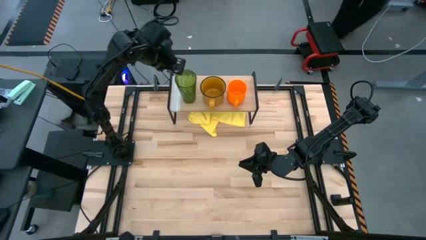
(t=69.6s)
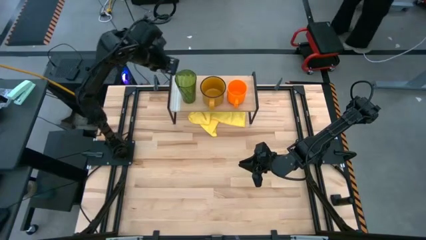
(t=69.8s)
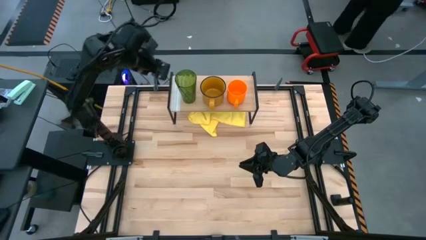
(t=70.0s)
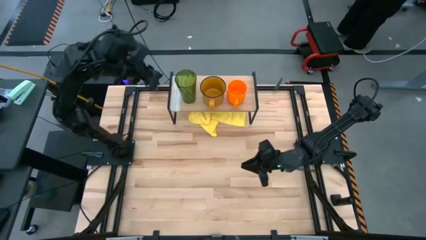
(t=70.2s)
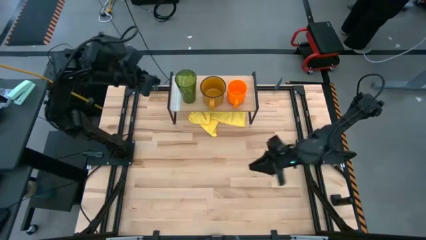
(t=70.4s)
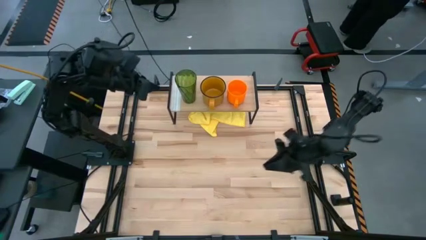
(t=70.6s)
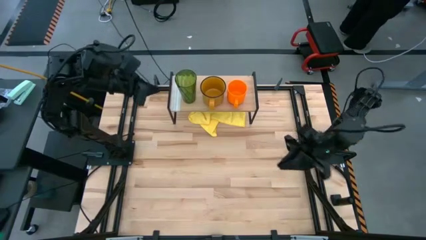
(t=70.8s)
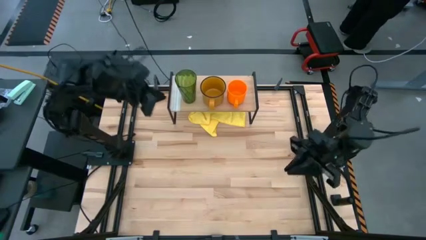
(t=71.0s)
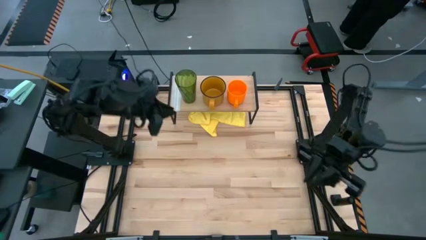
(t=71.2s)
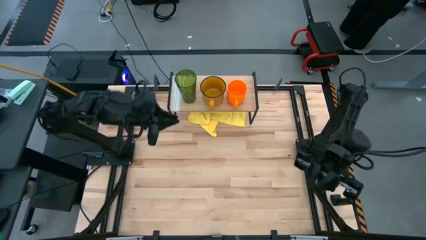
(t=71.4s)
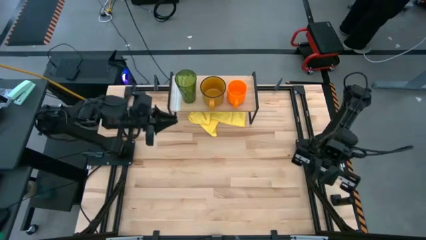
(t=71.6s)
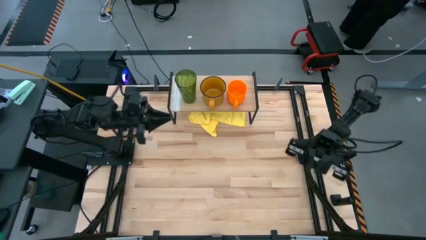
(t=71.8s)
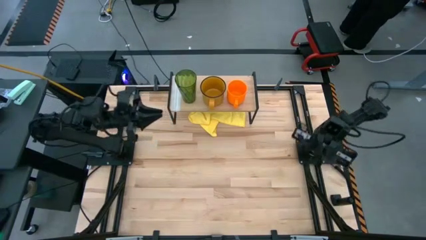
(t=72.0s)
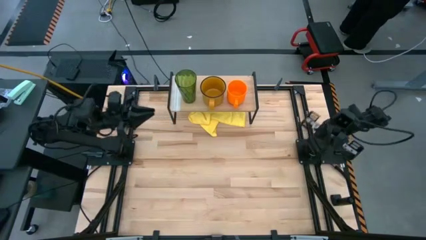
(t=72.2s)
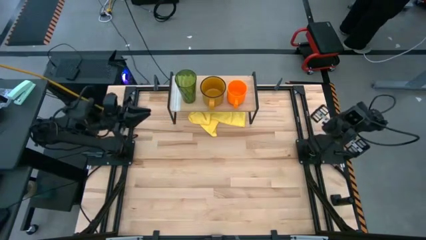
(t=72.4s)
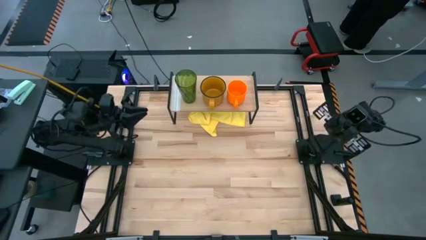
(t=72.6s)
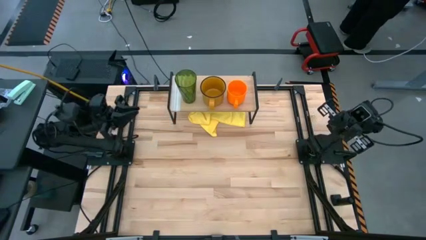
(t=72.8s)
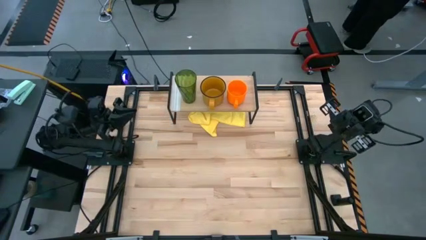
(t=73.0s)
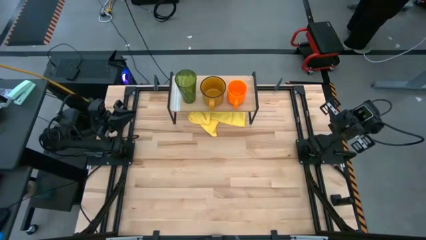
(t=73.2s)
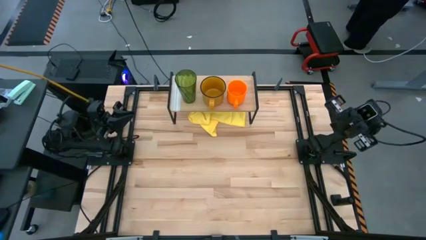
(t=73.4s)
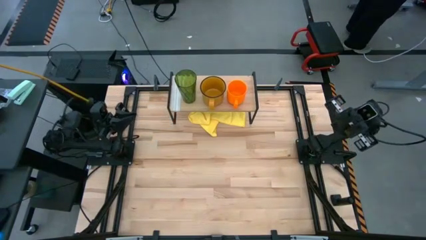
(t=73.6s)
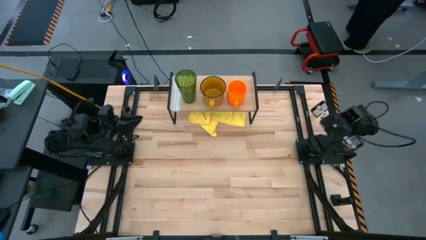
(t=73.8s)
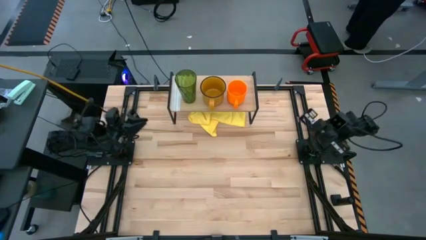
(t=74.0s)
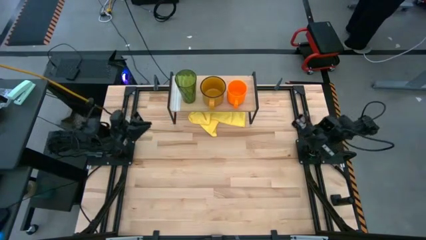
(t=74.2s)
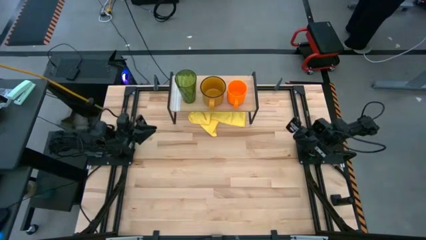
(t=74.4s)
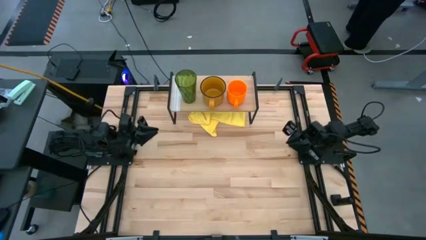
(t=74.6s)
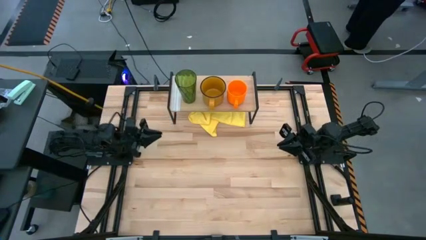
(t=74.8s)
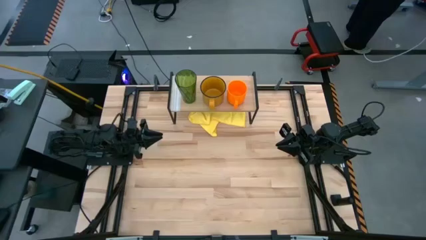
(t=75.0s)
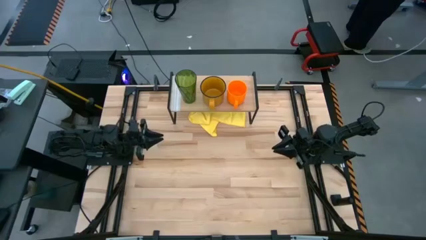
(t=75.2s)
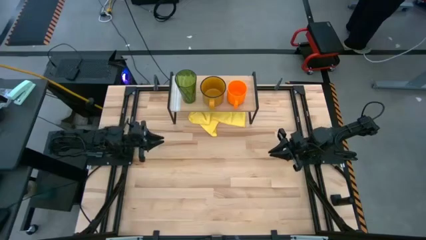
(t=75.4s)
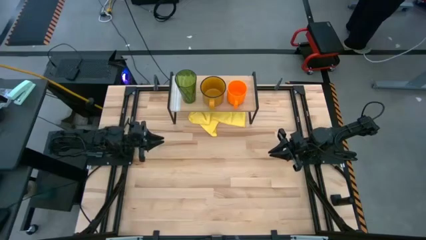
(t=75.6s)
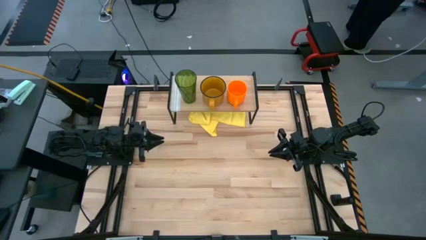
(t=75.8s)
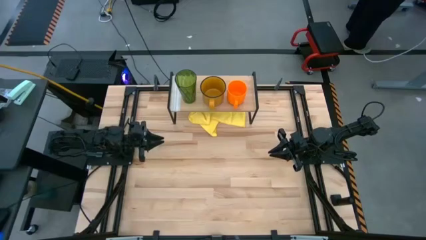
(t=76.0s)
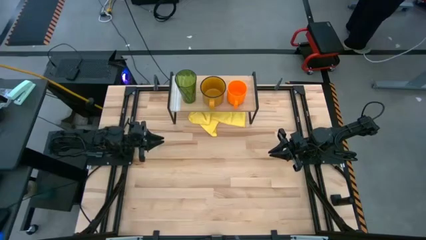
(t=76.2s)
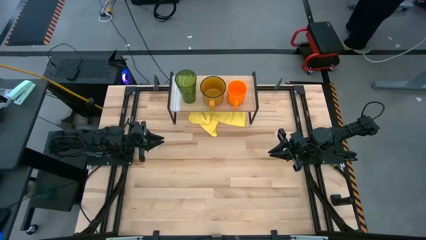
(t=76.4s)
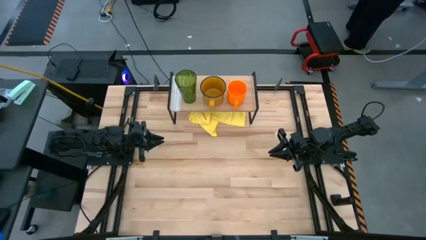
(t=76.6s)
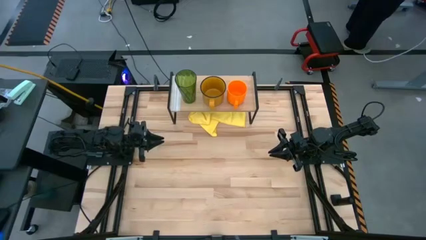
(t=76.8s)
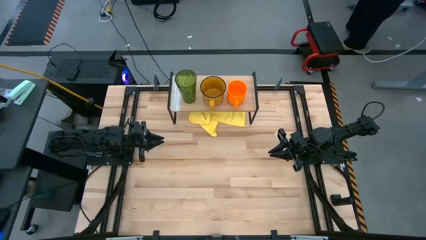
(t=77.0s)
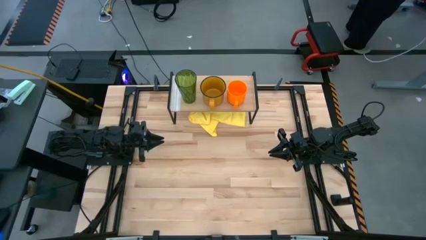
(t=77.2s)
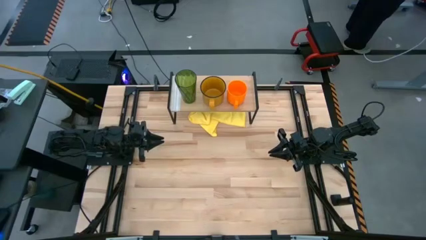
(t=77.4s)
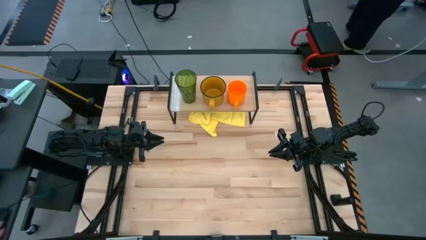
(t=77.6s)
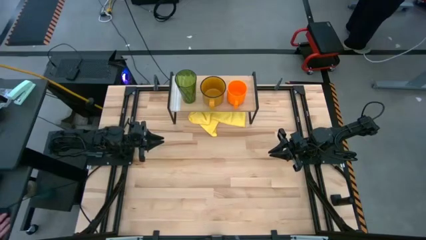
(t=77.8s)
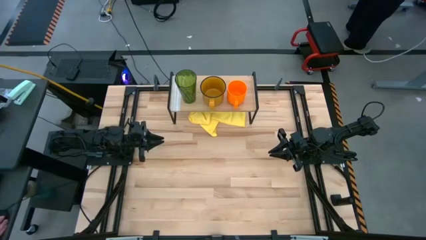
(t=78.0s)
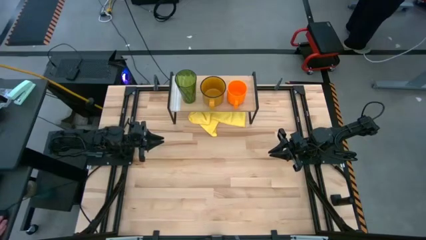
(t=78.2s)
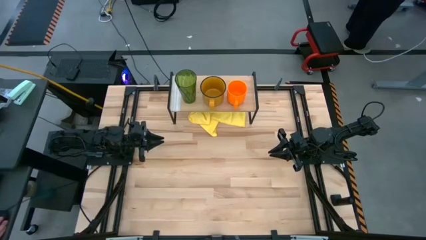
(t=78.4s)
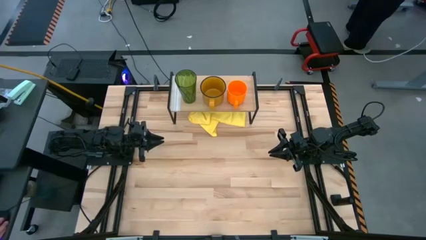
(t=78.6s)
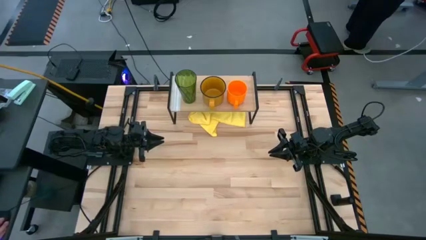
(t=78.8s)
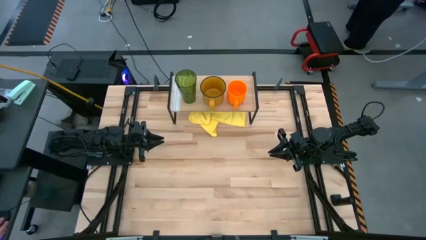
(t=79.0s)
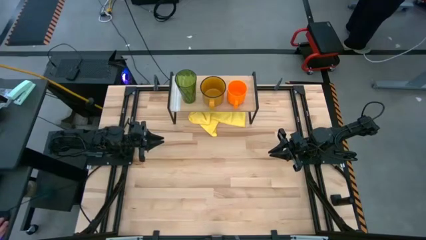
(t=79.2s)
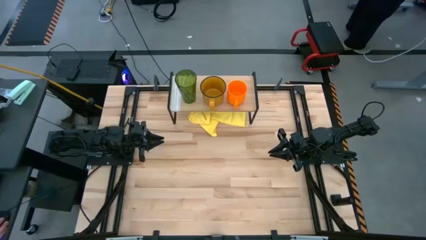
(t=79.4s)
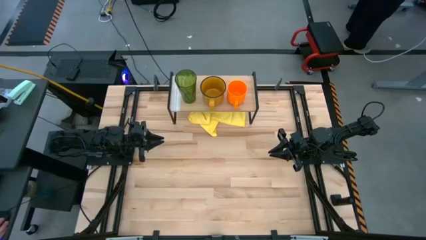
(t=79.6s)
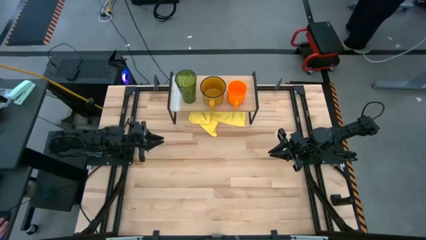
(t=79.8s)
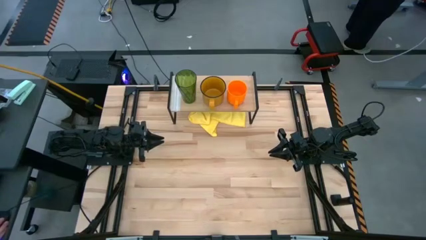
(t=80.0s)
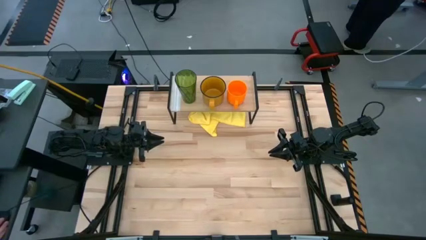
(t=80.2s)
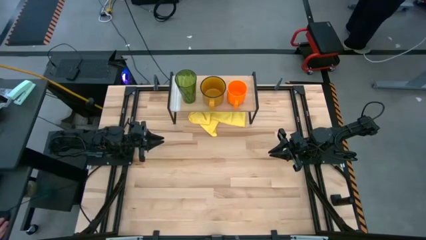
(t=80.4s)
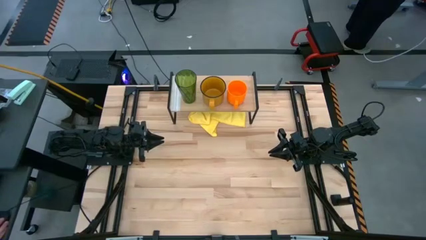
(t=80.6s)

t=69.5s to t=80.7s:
Task: Stack small to large cups/mugs on shelf
Return to Home Position

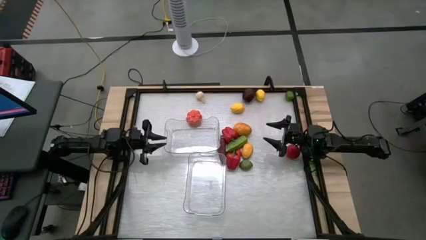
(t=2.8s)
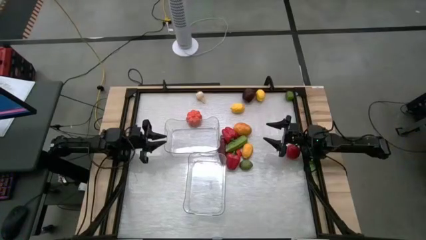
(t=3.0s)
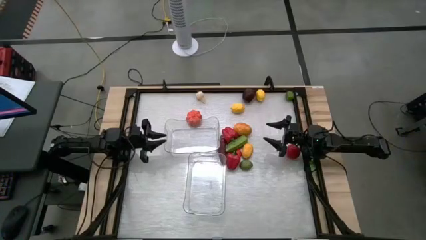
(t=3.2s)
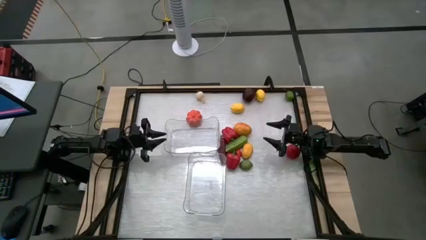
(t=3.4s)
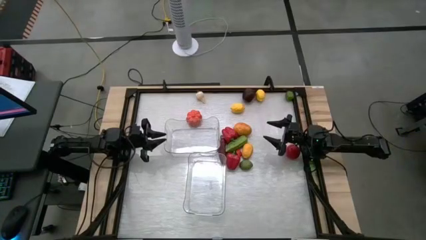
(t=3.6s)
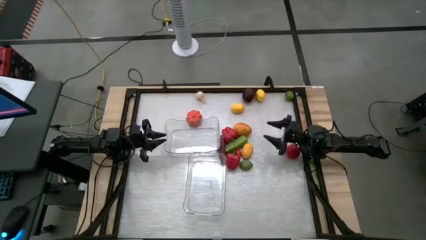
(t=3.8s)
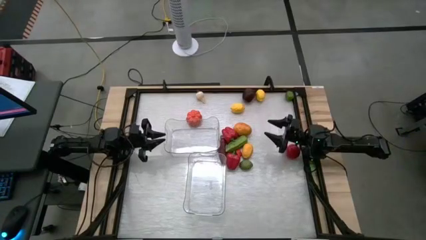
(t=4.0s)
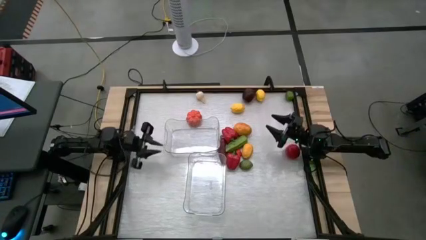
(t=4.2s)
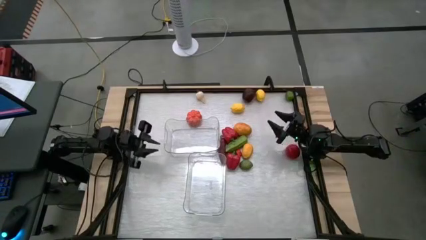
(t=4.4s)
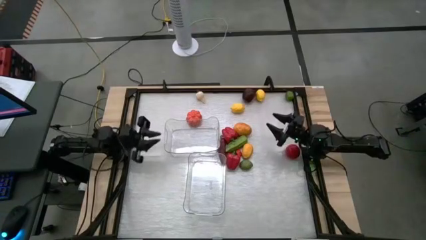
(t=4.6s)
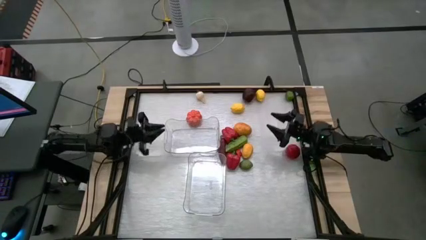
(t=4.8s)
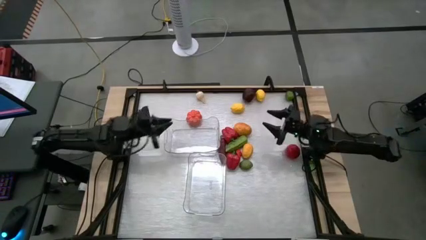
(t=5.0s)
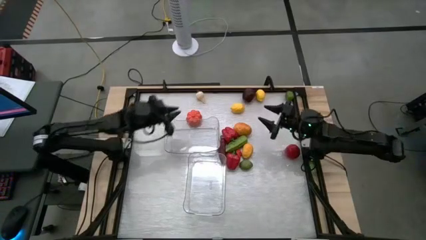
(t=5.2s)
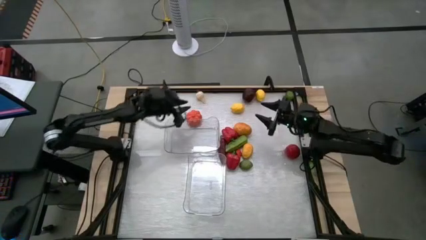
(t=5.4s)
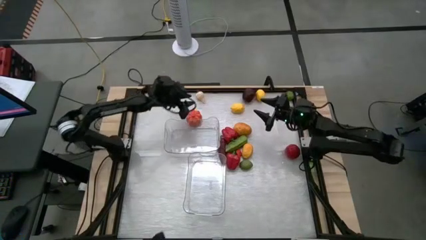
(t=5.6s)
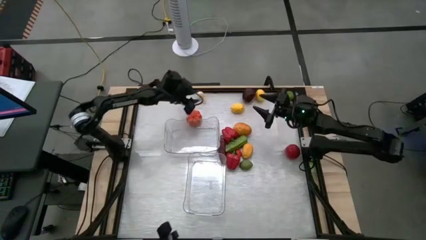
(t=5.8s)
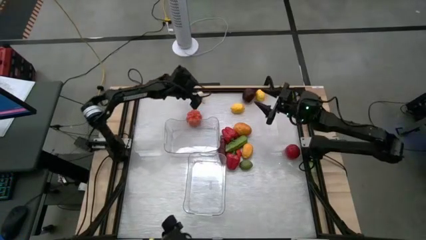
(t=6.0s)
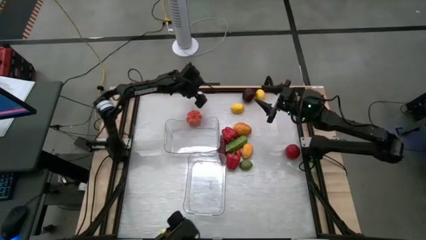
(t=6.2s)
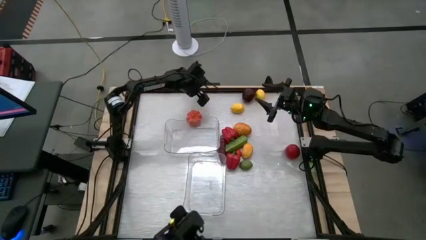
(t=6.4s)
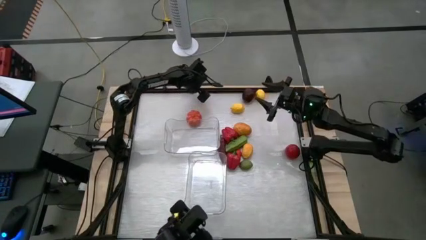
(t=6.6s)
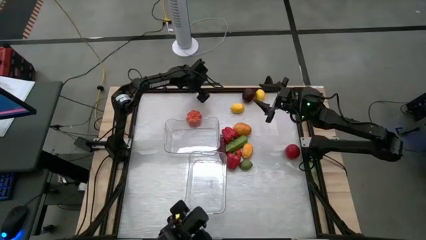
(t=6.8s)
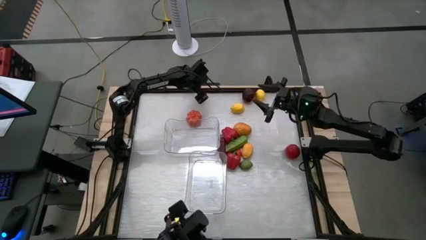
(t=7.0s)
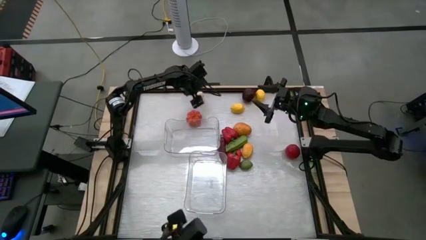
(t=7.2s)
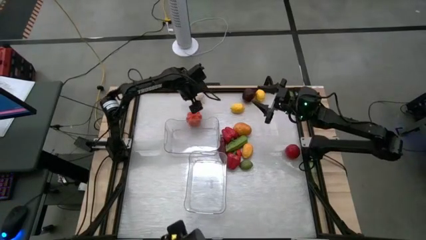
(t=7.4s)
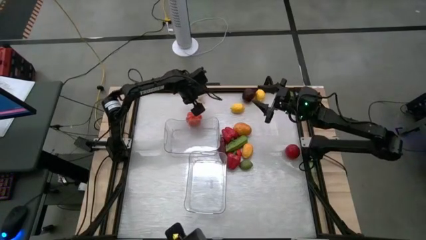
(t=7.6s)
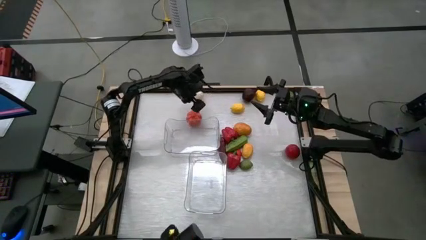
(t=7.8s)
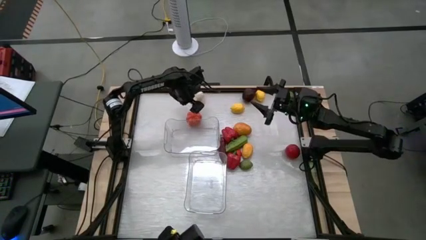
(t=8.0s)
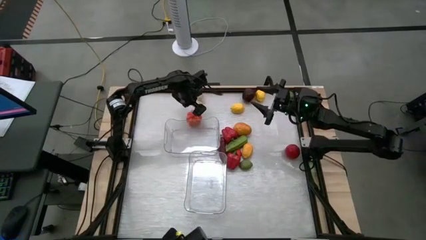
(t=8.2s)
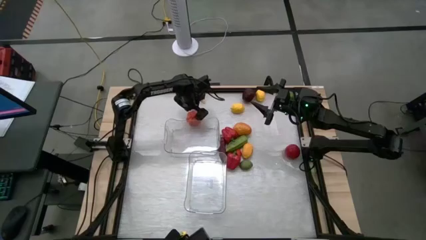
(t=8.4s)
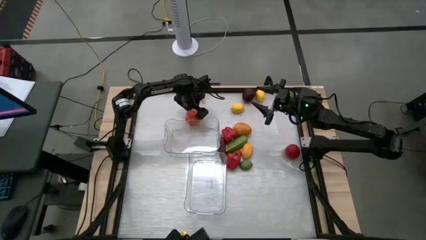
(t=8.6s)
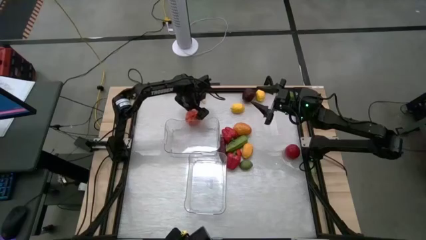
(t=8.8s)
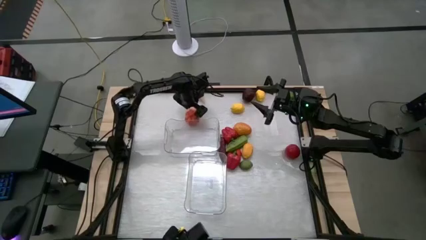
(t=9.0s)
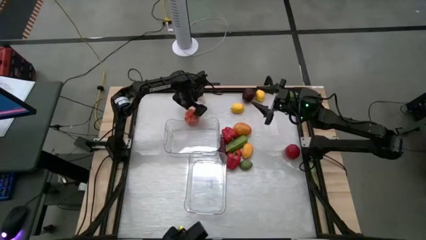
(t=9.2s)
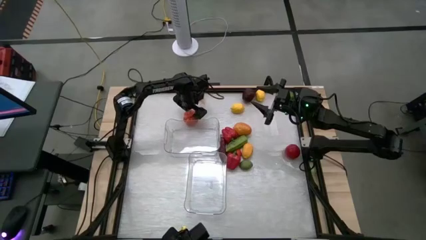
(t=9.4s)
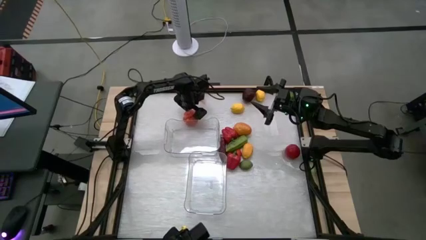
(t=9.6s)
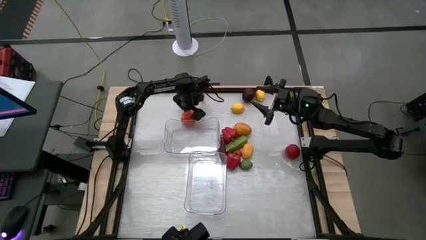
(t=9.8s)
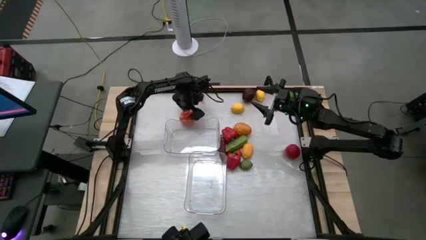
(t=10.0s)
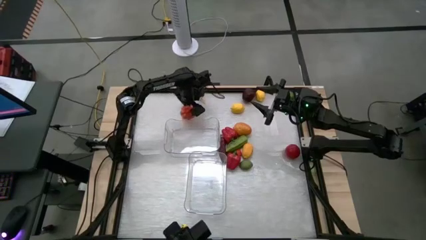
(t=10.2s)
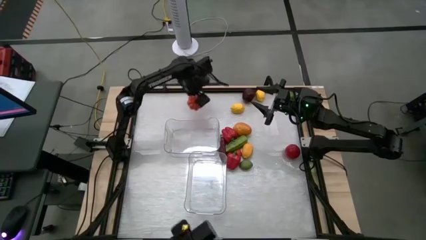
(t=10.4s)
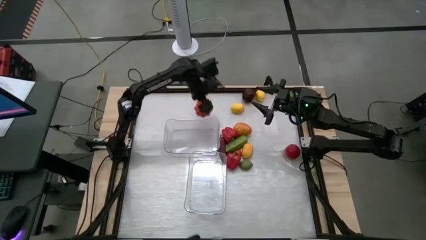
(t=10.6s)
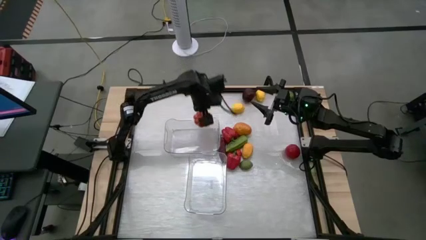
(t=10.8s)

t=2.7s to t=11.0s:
Task: Sort produce into baskets
Put the pumpkin into the top transparent bin
